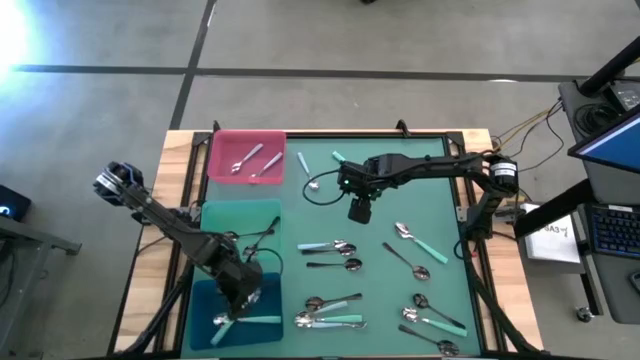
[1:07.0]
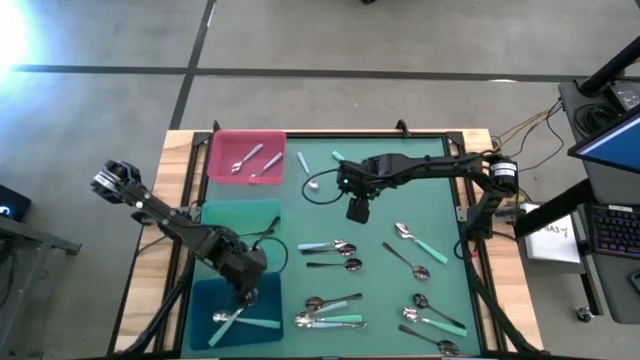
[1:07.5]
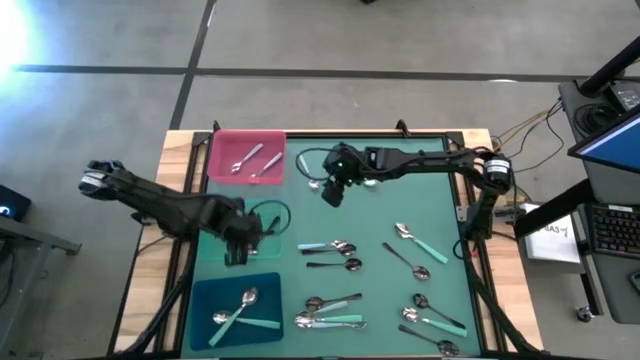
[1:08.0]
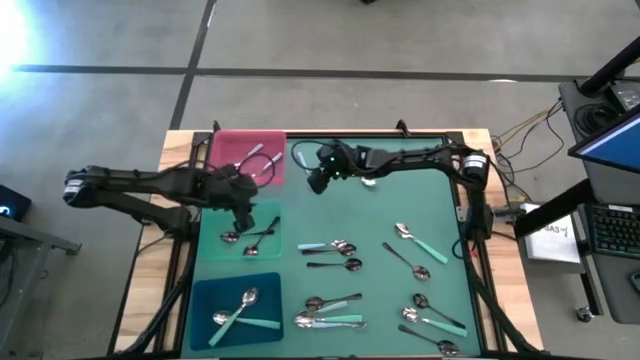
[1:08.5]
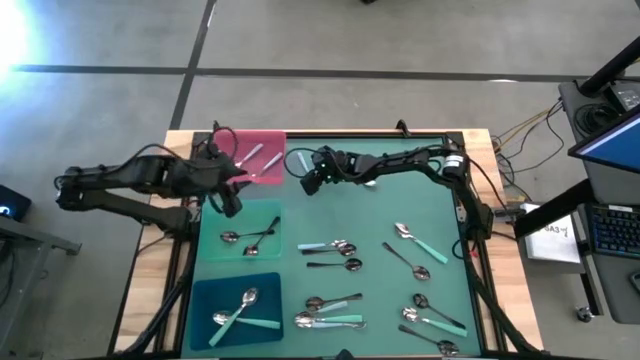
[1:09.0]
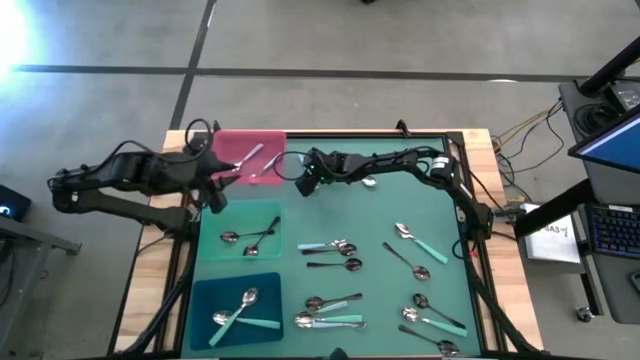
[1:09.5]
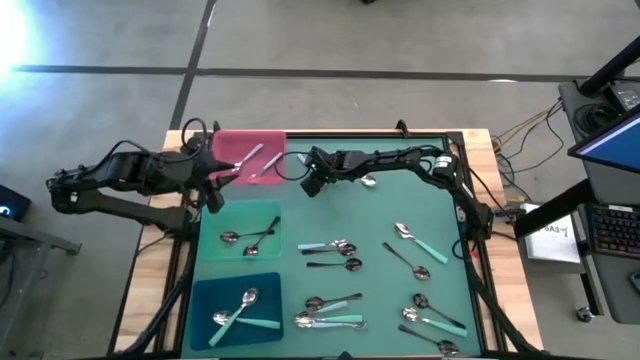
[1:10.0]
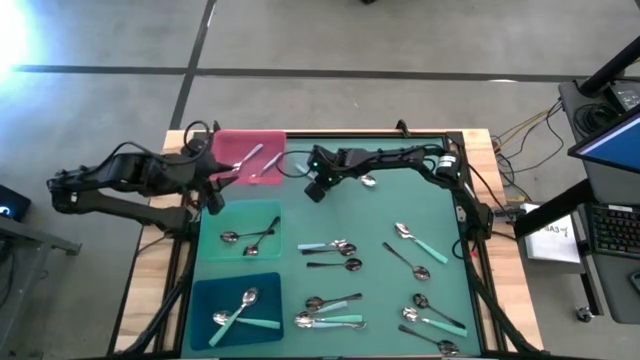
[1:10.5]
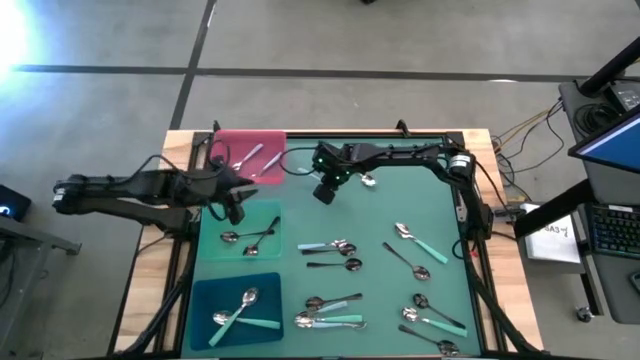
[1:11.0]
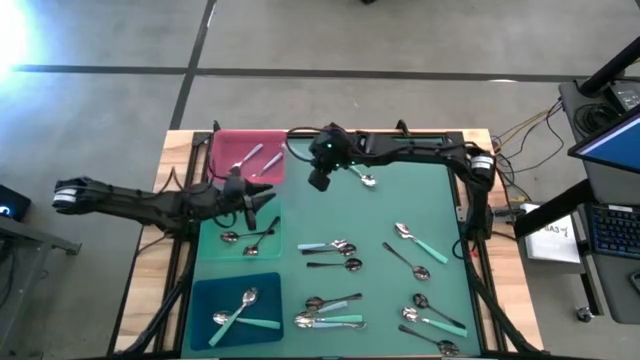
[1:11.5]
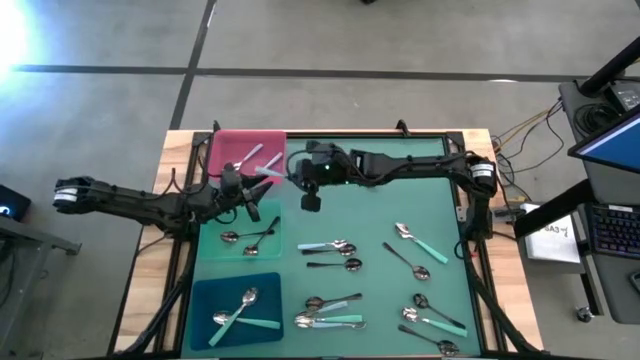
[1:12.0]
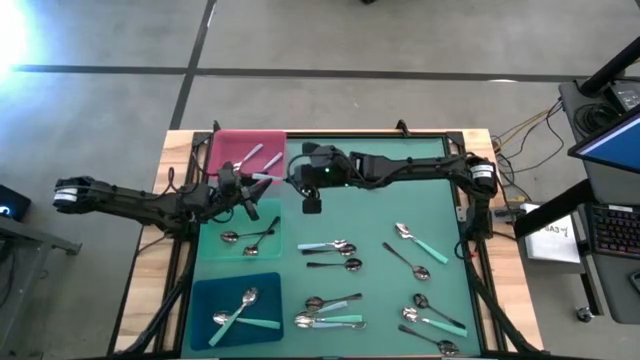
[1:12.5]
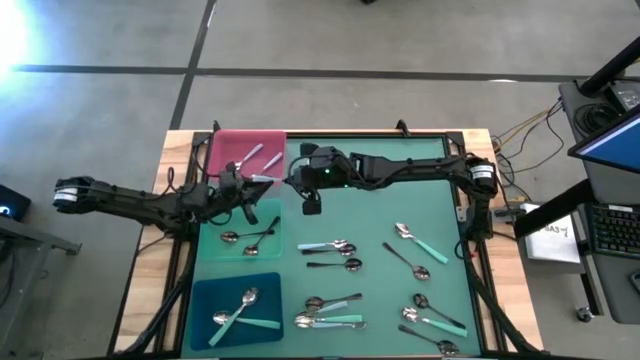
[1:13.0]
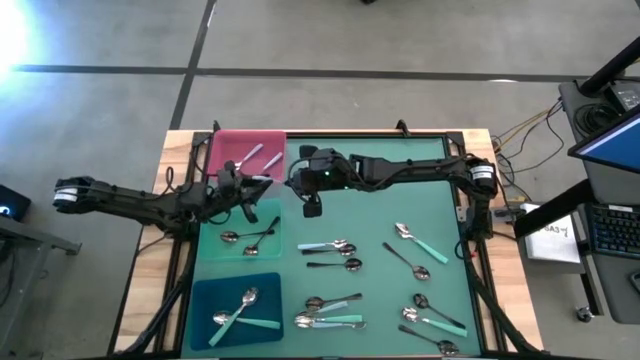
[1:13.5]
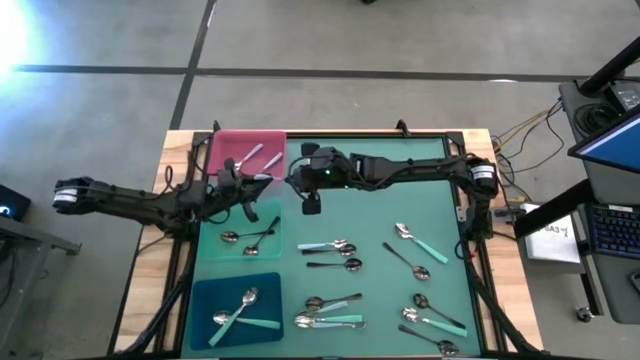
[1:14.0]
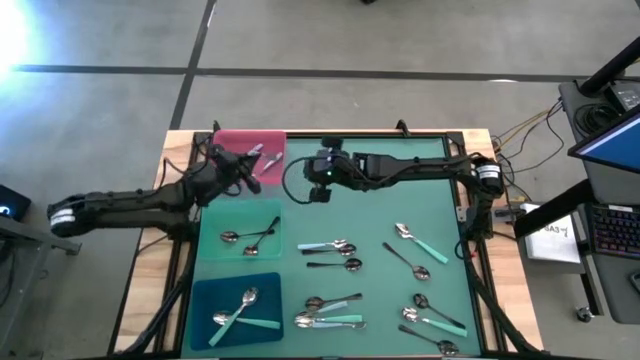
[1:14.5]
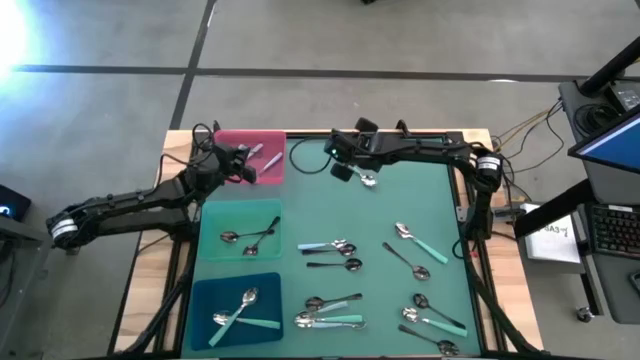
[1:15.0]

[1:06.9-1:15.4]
Task: Sort silverware by color (type)
Put the blue spoon into the pink blue bin

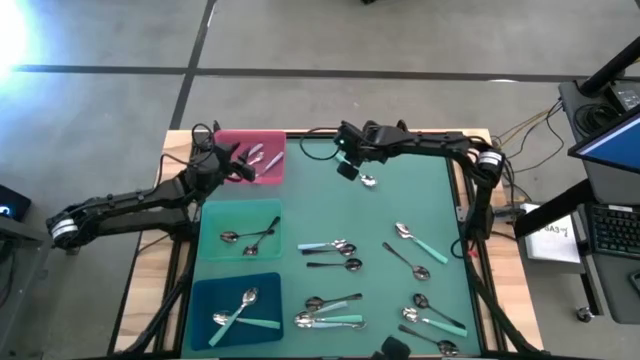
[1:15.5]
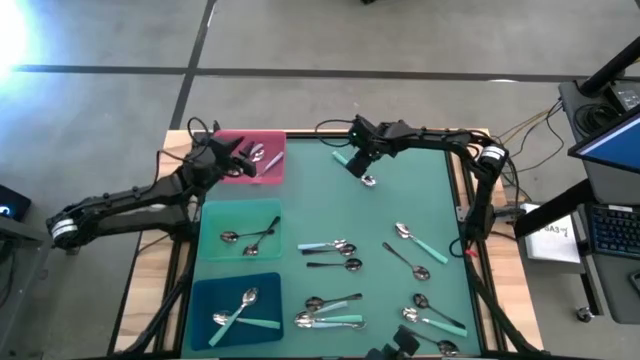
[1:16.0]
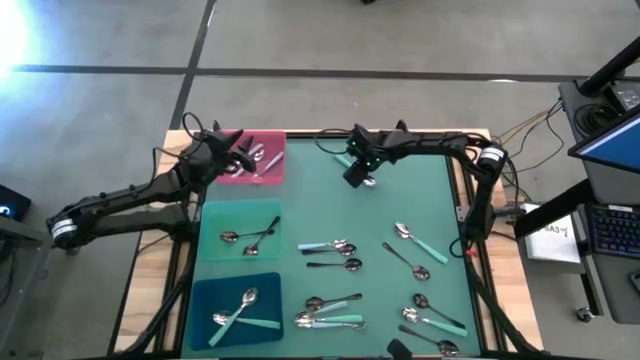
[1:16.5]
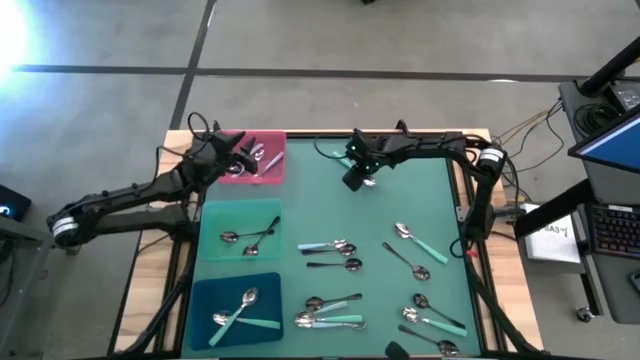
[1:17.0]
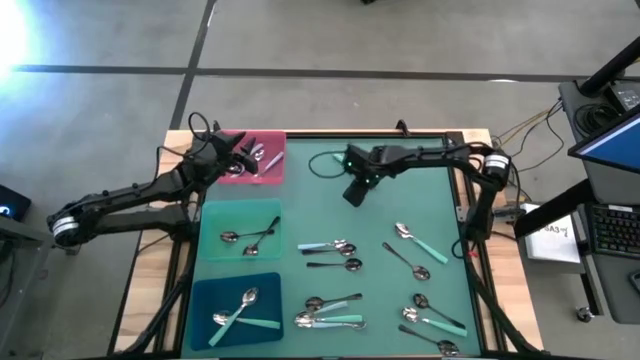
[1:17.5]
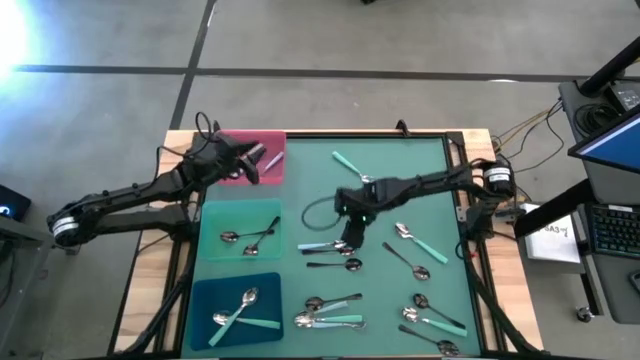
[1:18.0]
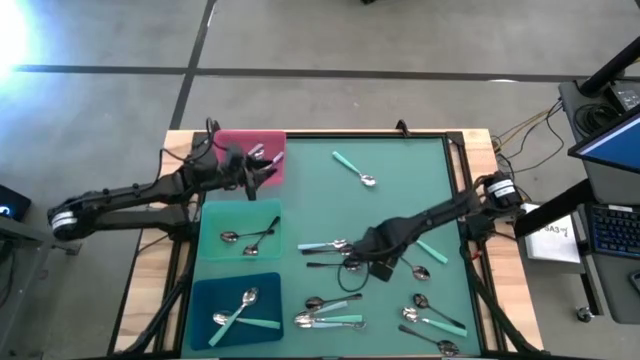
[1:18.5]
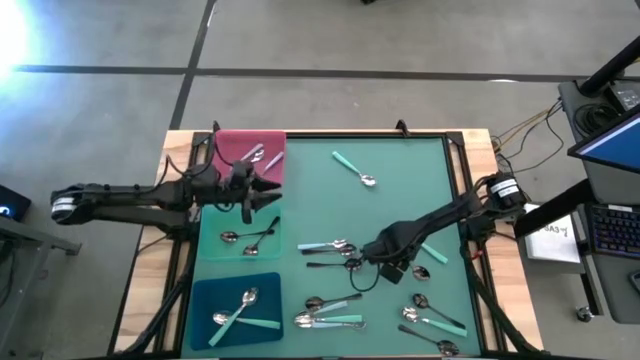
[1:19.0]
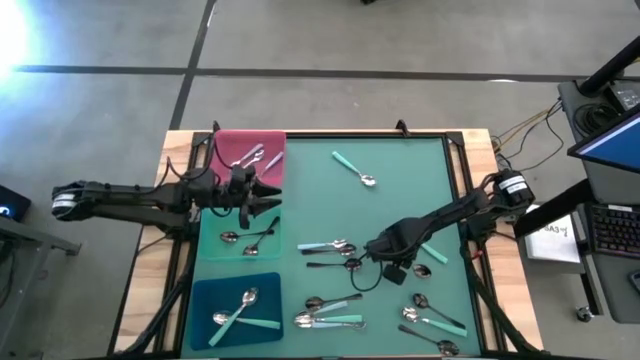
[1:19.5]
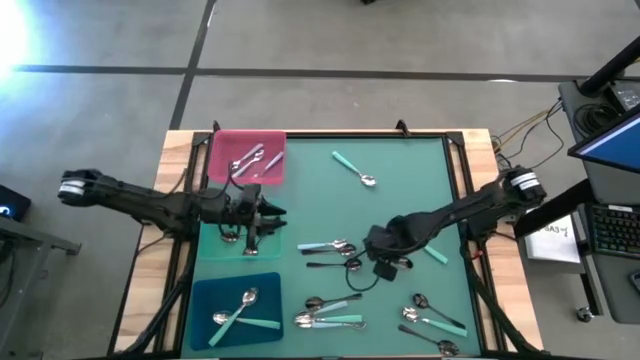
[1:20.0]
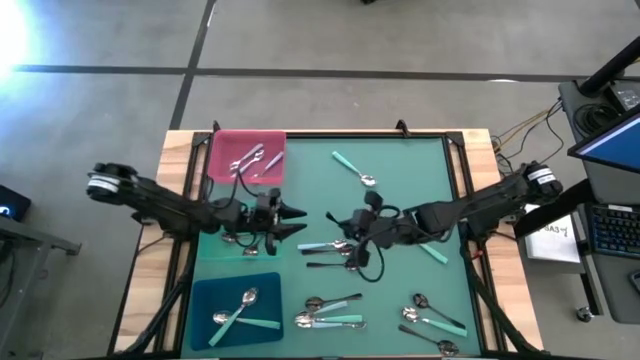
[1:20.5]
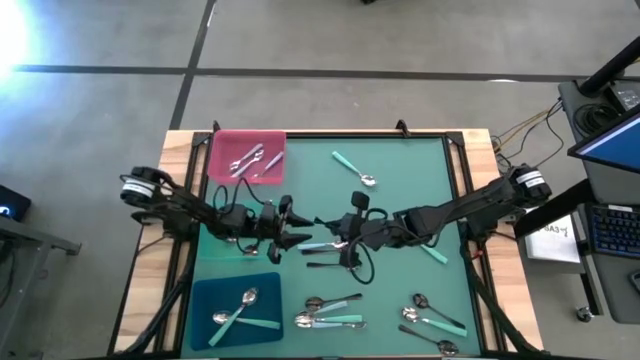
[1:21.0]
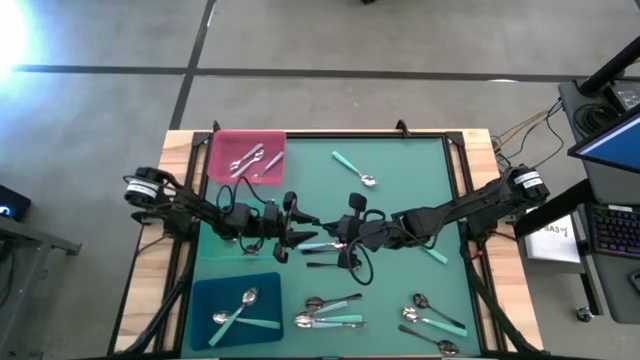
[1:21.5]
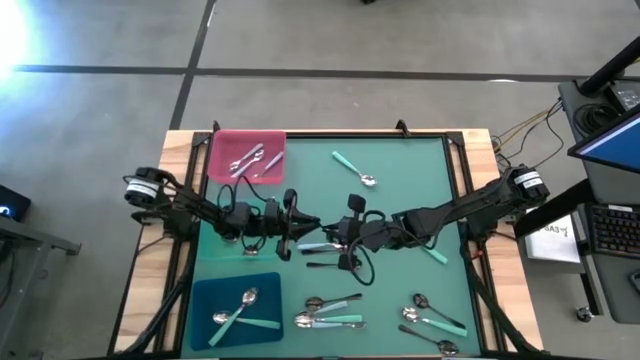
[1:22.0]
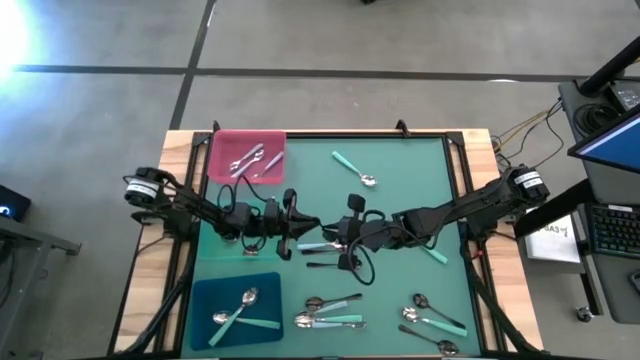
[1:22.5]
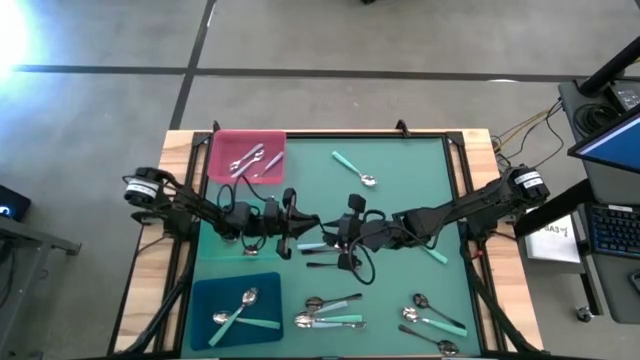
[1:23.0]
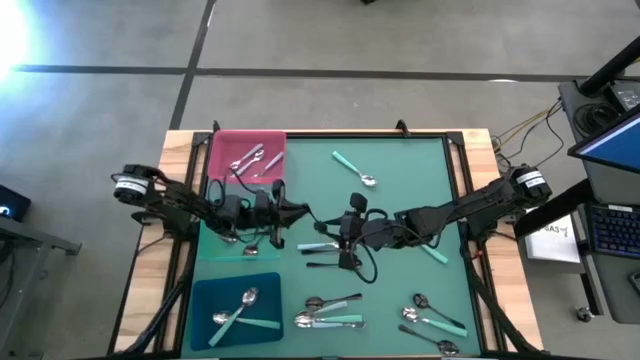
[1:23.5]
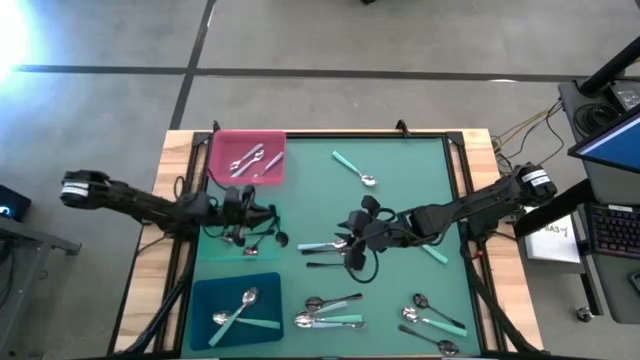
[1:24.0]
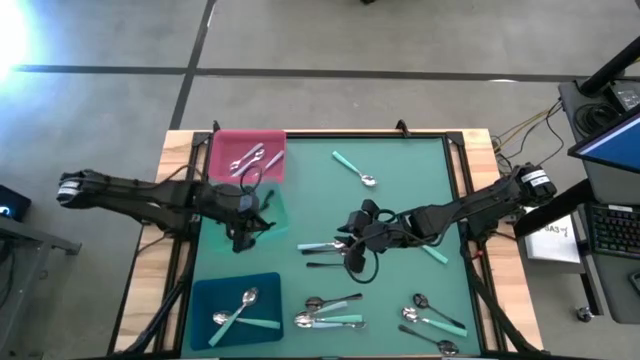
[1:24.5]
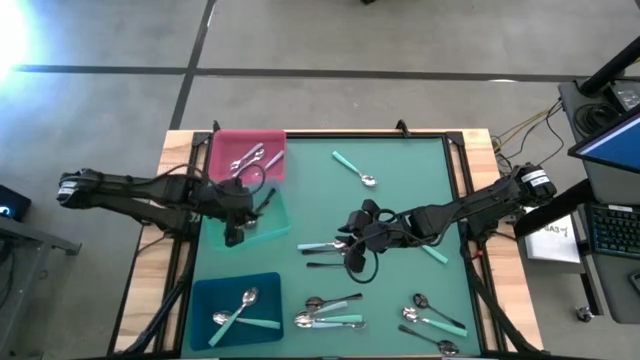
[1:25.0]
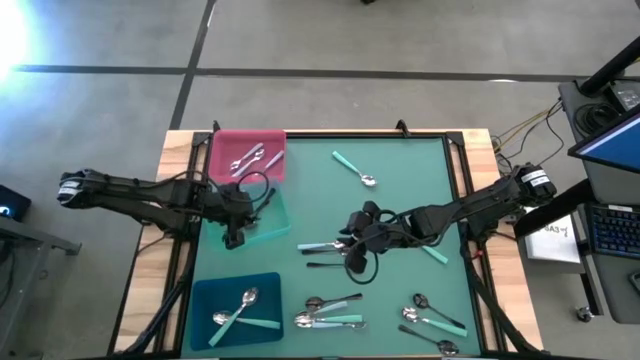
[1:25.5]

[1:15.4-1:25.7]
Put the black spoon into the green bin

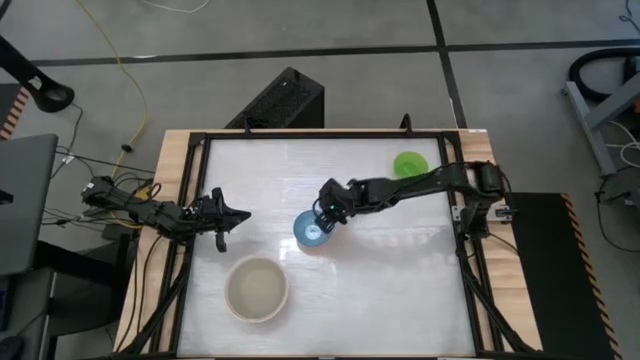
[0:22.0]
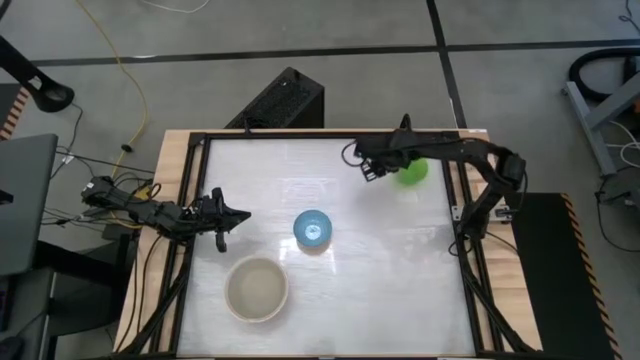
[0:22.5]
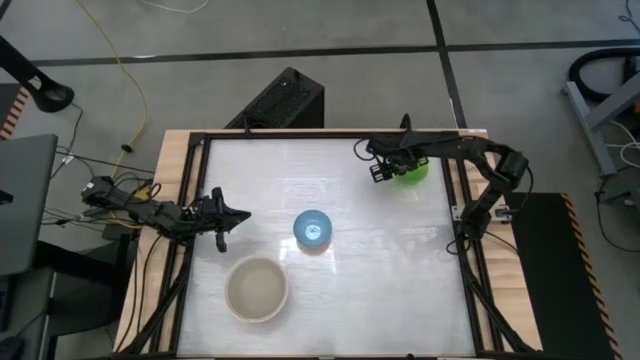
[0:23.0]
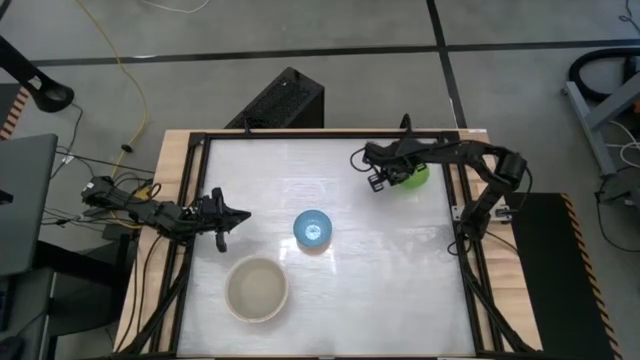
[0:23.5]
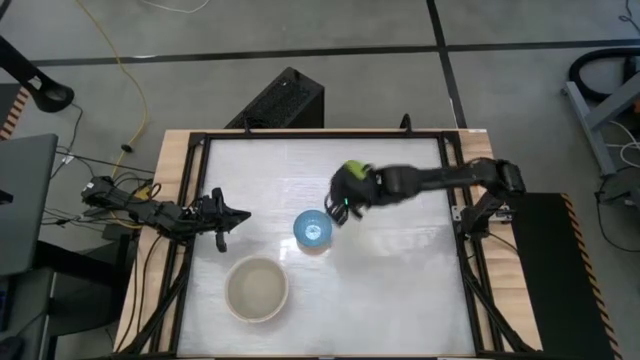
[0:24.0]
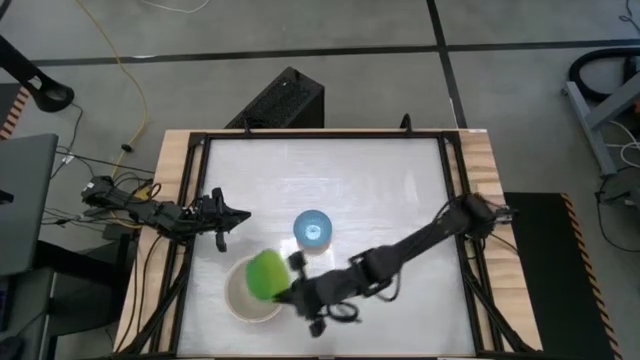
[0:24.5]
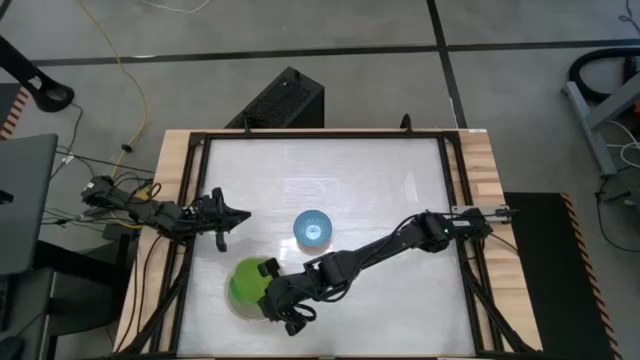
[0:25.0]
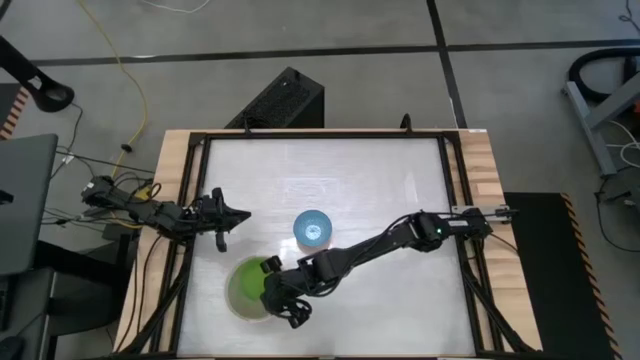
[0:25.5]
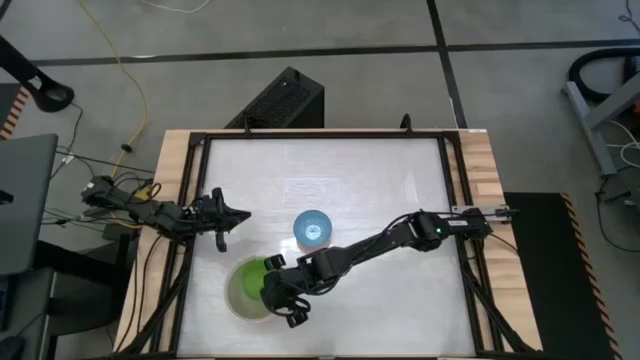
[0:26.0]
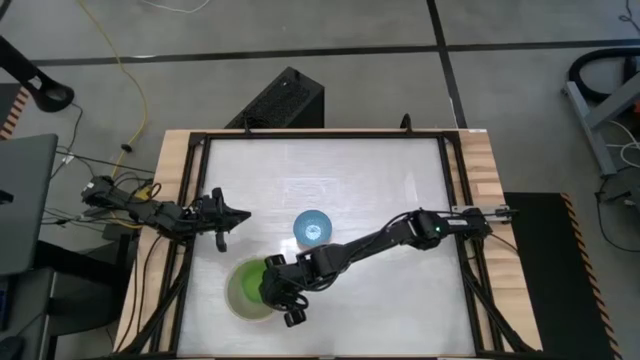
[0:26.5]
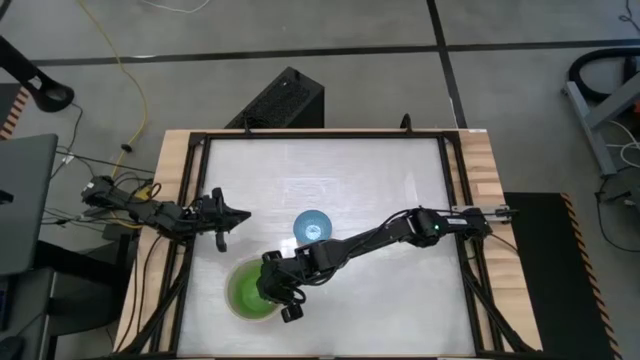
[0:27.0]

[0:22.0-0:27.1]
Task: Nest bowls inside each other by size order
Stack the green bowl on top of the gray bowl
